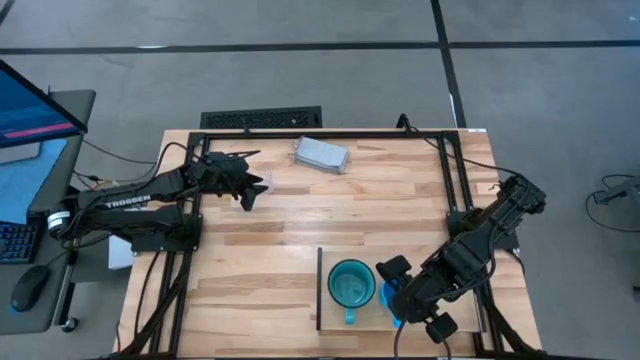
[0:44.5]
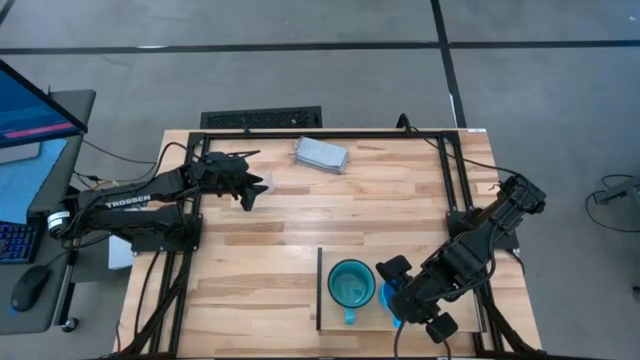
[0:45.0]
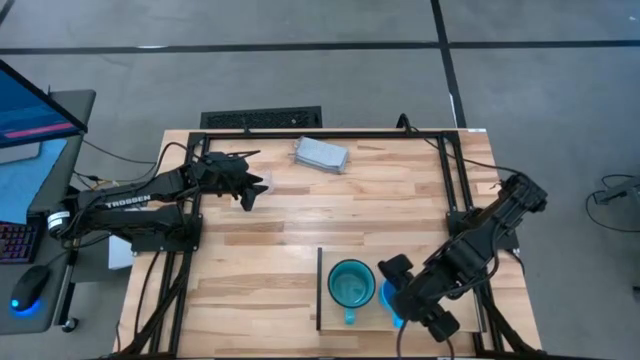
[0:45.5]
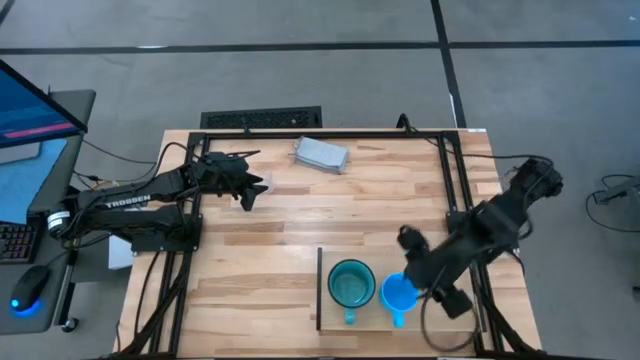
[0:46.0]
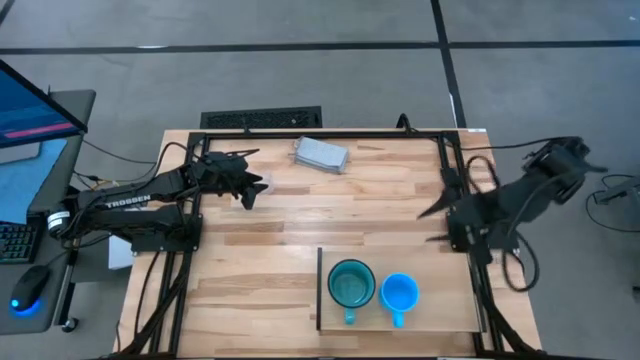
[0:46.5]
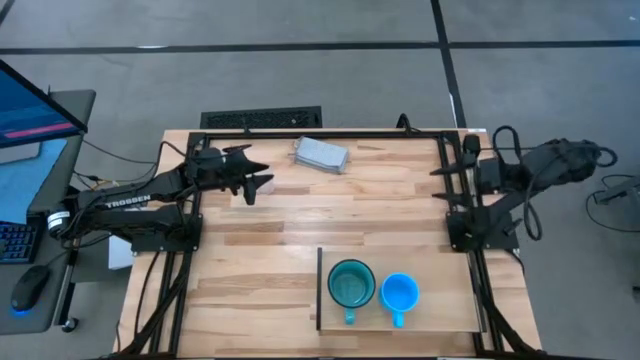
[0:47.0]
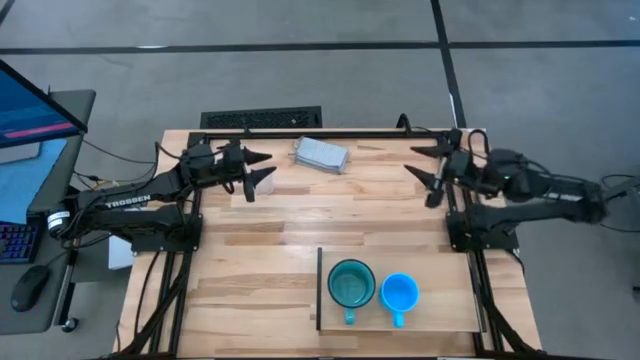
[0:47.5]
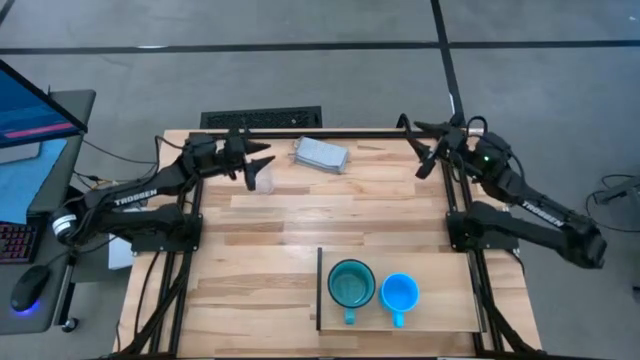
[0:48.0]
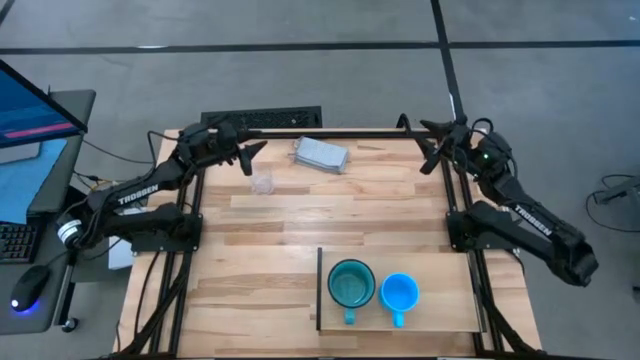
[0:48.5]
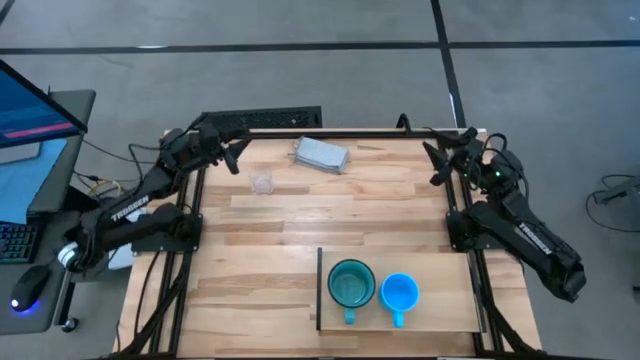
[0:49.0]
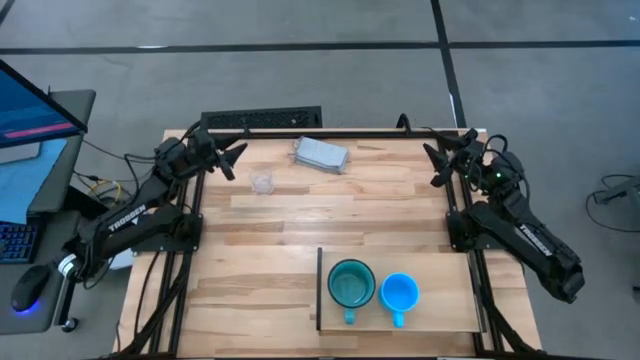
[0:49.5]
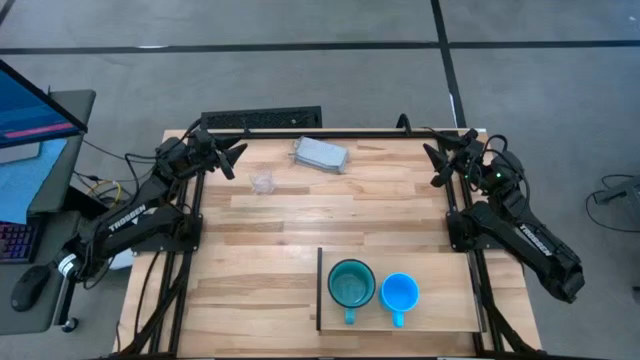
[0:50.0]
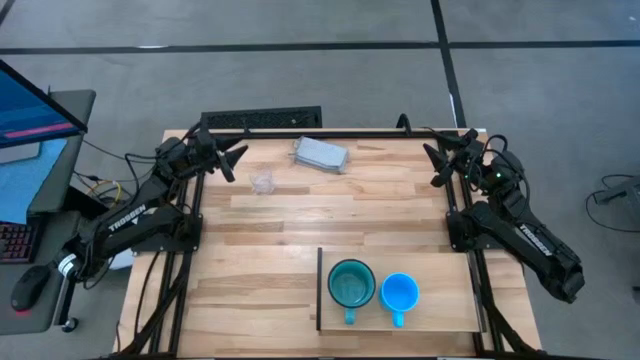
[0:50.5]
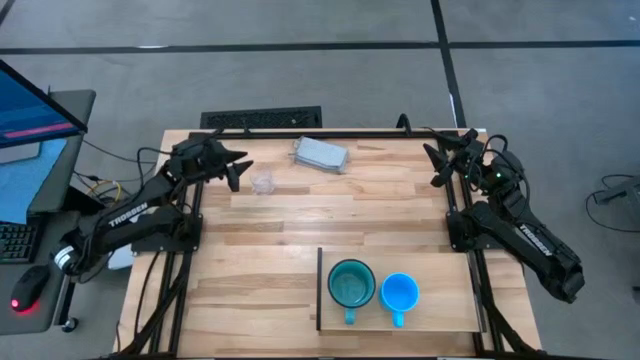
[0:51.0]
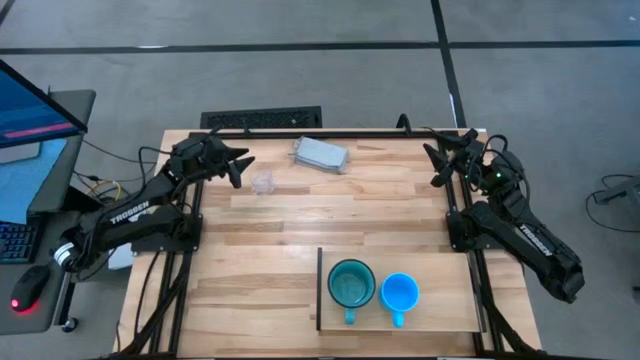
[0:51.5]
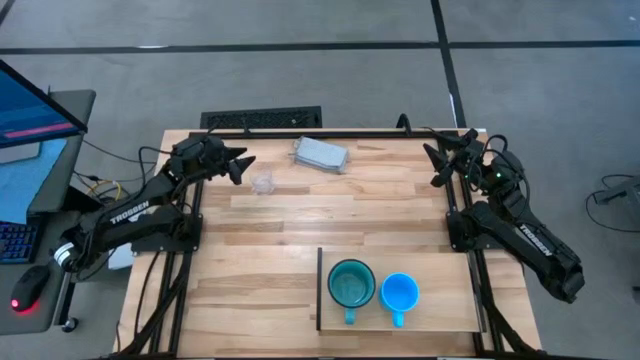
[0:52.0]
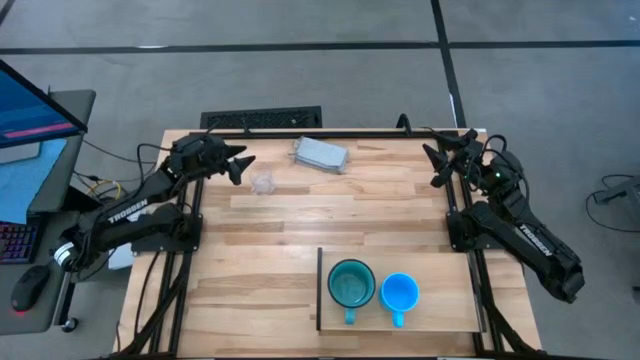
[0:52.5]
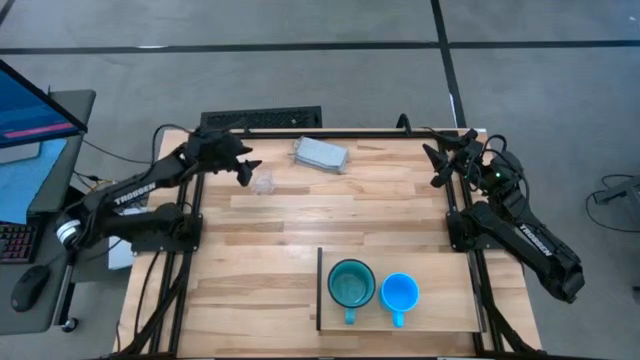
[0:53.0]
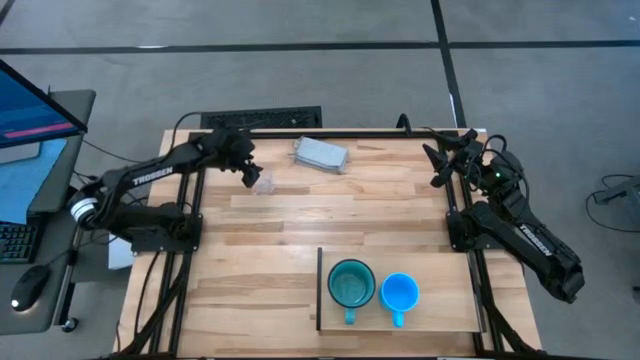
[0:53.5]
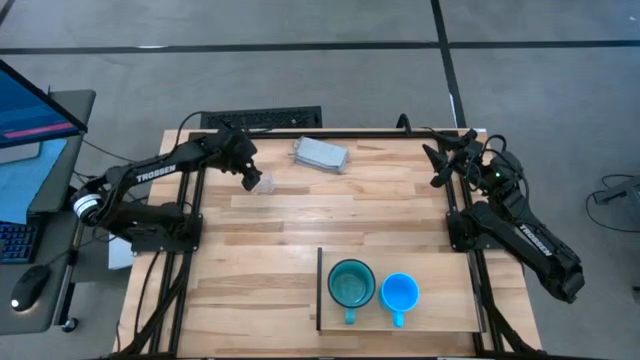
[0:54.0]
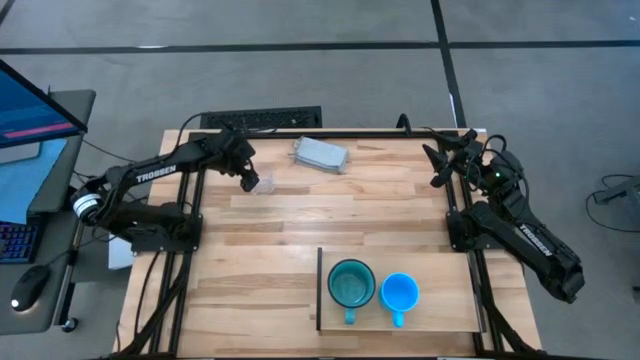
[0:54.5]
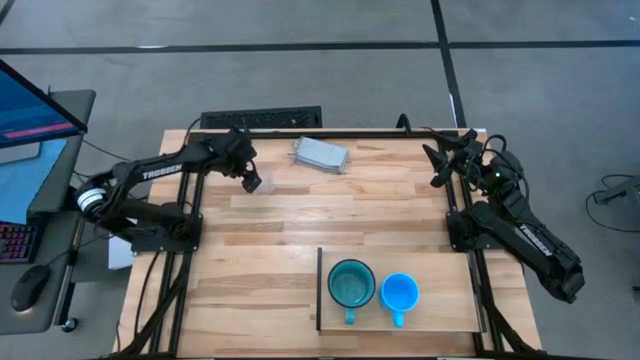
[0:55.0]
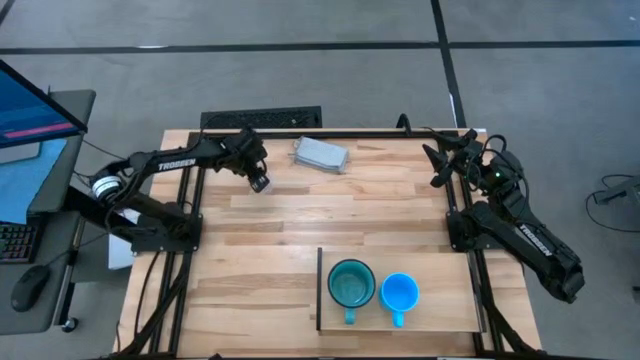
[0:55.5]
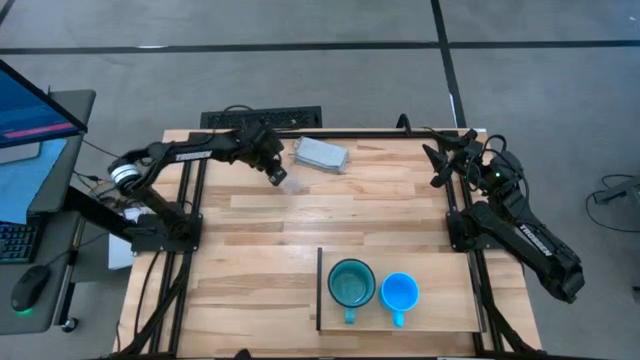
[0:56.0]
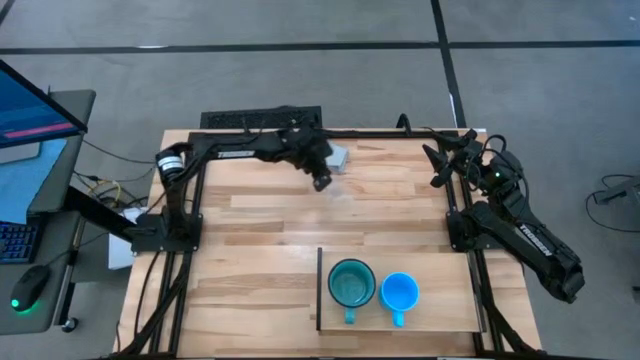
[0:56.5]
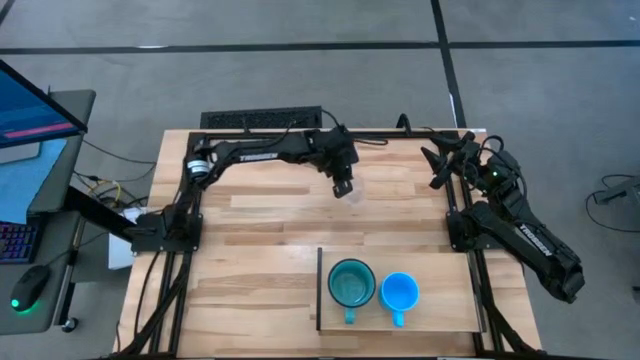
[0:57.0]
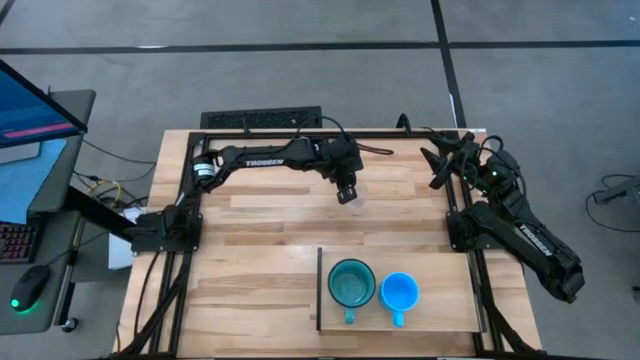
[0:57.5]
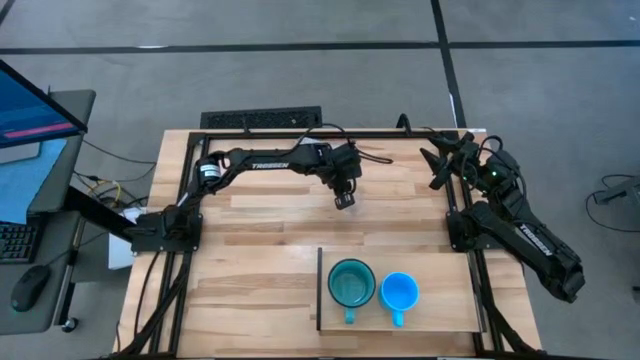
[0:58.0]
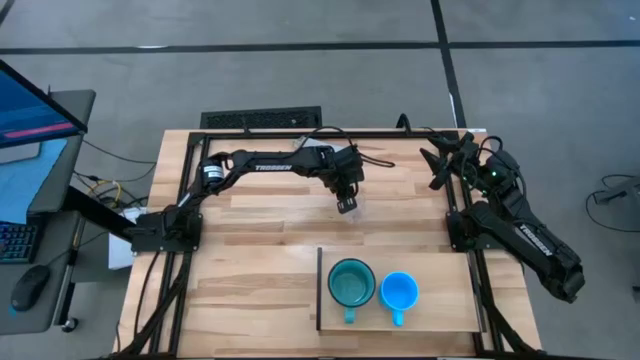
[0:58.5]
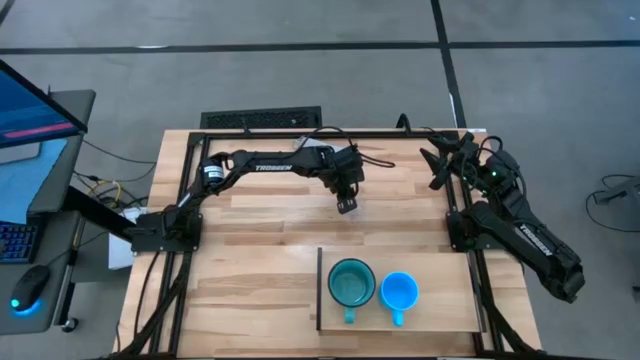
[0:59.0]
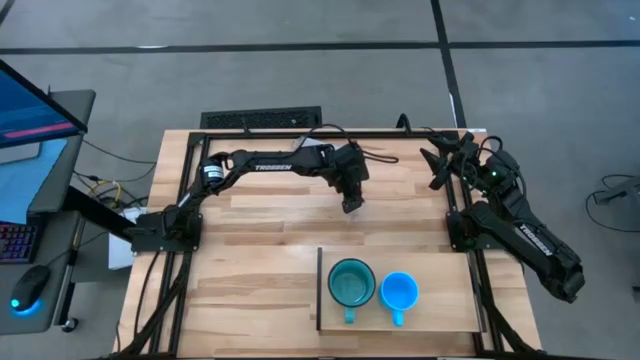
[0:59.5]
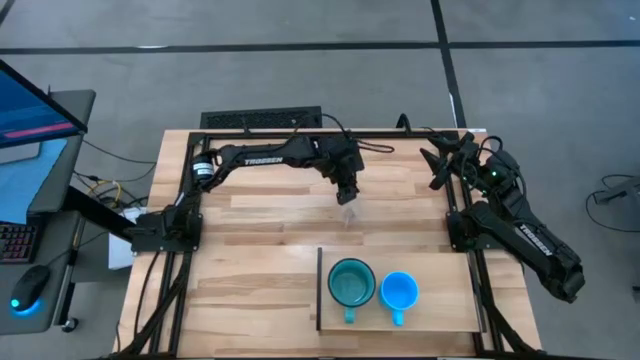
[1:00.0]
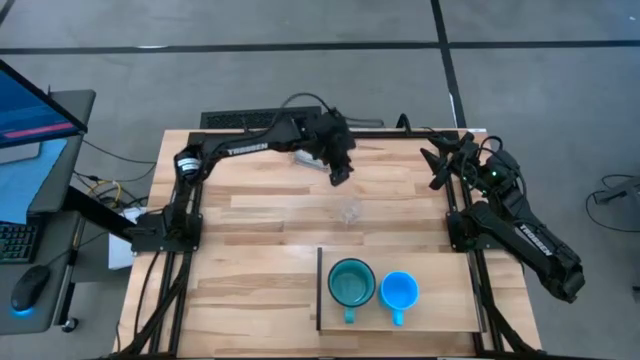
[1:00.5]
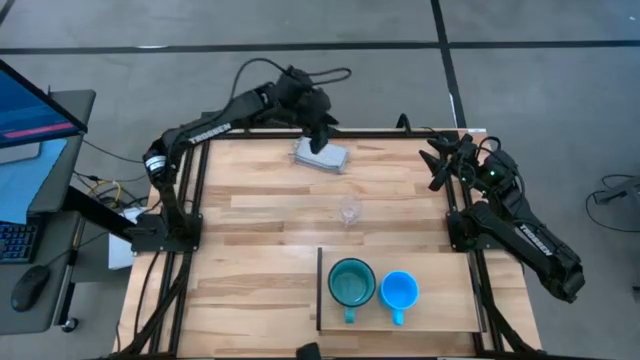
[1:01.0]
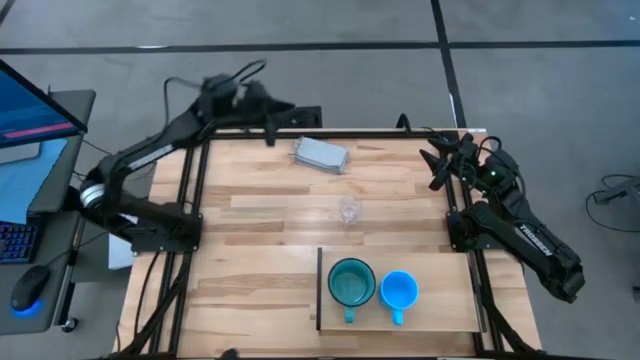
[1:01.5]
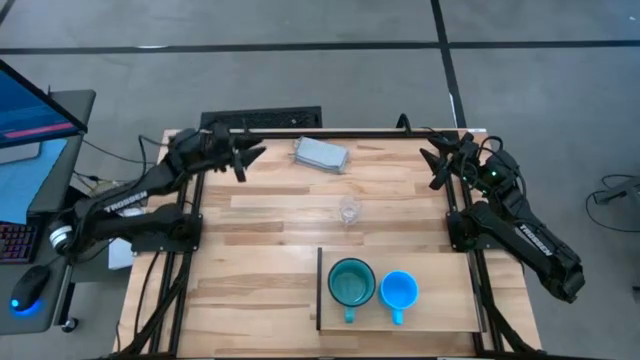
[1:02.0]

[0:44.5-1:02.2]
Task: Stack small to large cups/mugs on shelf
Put the transparent mug on the shelf

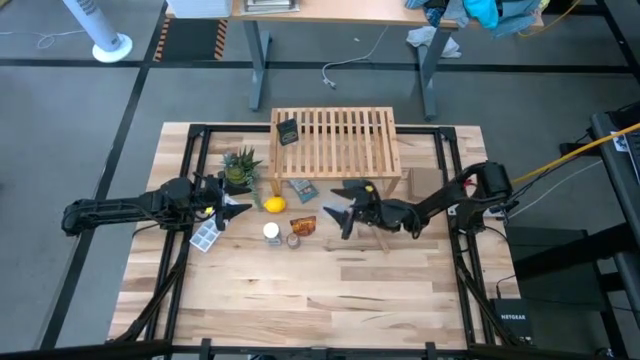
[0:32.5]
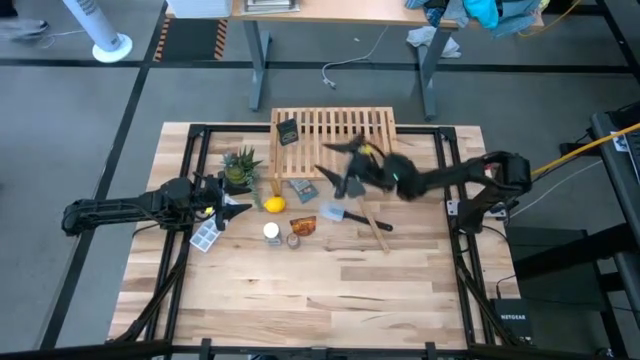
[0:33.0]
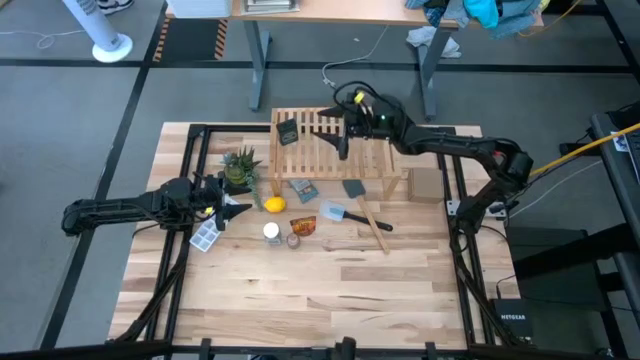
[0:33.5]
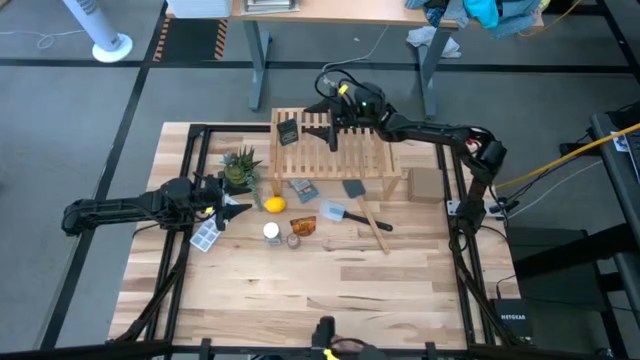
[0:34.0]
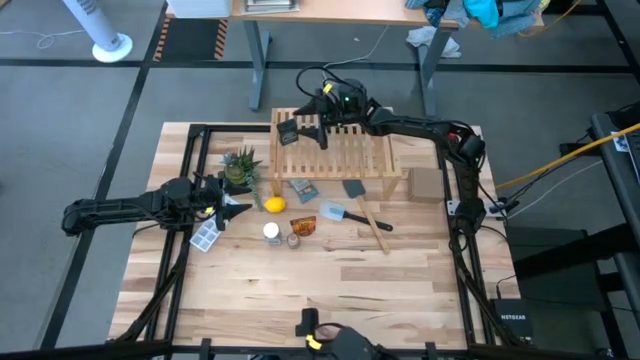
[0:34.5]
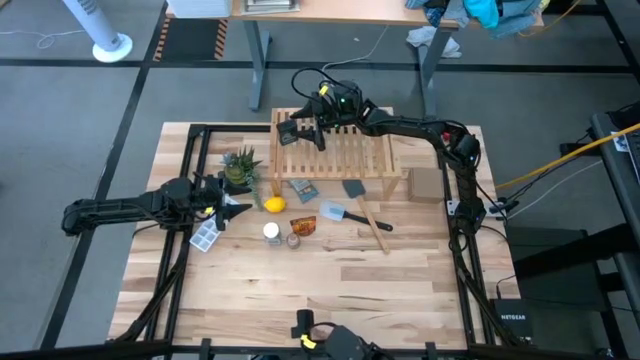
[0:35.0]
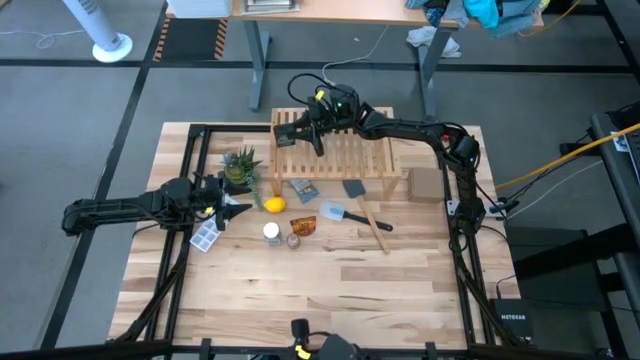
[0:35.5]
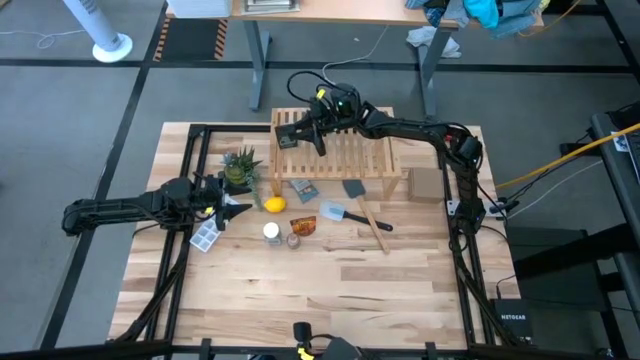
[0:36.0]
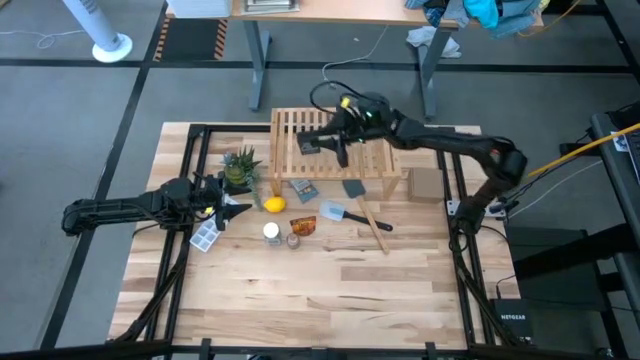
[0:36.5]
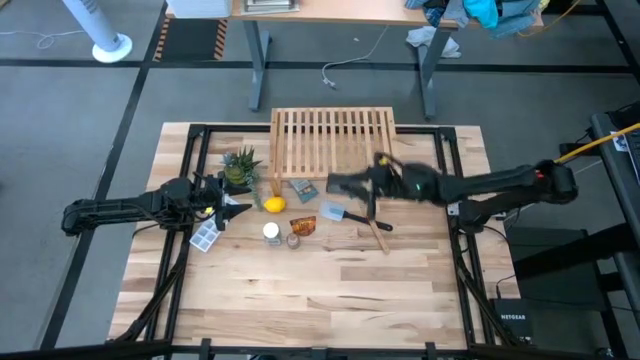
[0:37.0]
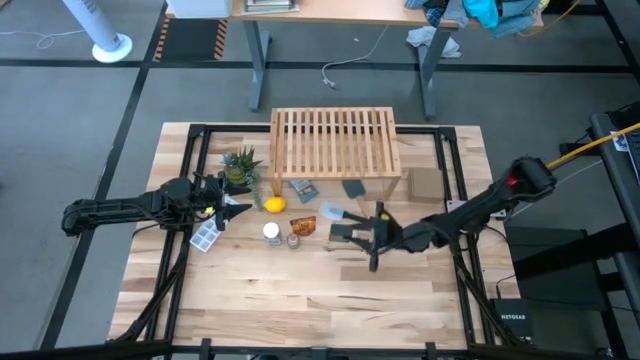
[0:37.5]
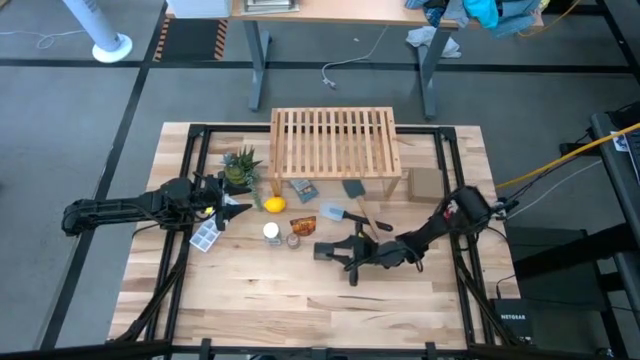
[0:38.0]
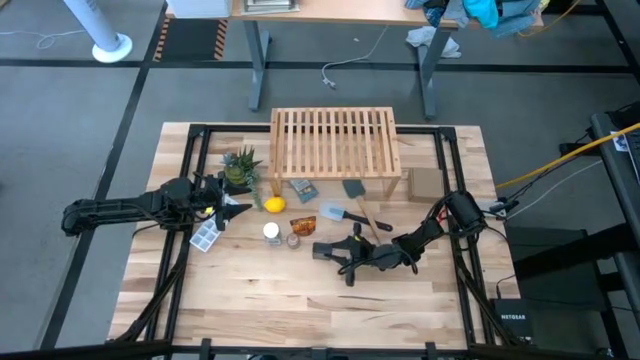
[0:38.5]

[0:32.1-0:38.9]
Task: Shelf spices
Remove the black seasoning can from the shelf
